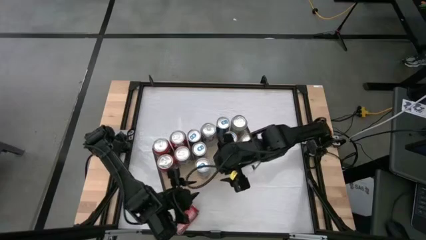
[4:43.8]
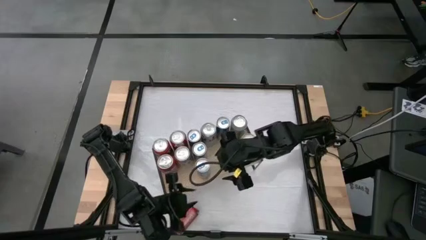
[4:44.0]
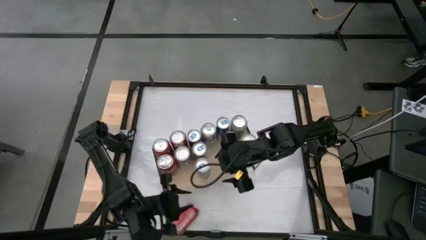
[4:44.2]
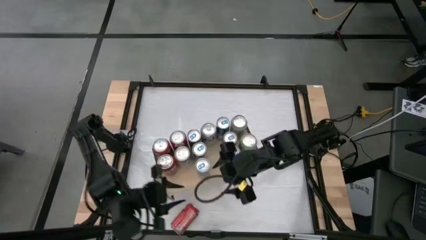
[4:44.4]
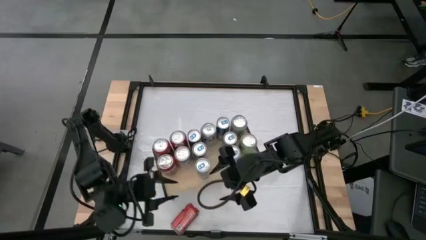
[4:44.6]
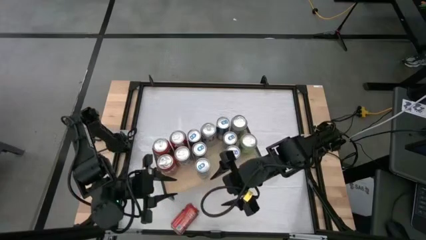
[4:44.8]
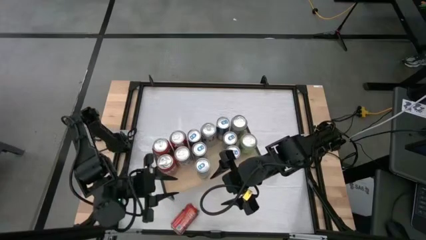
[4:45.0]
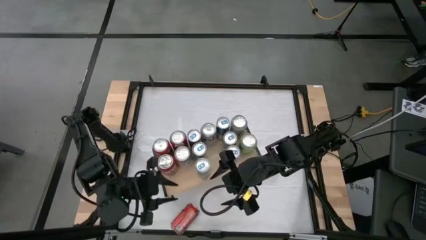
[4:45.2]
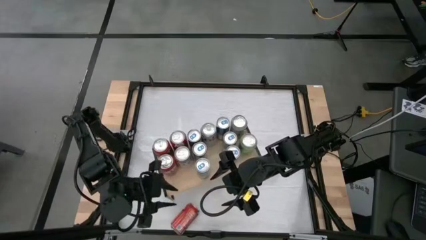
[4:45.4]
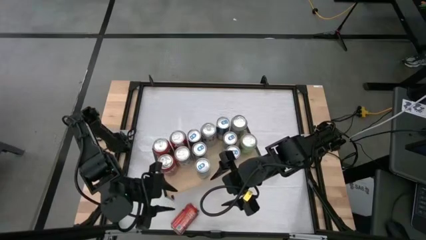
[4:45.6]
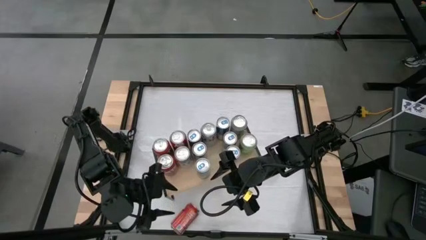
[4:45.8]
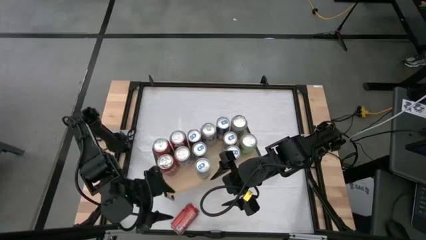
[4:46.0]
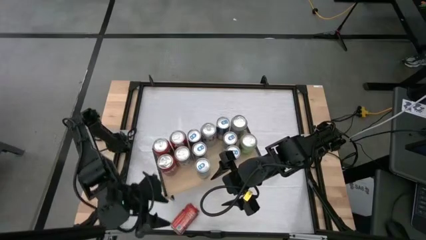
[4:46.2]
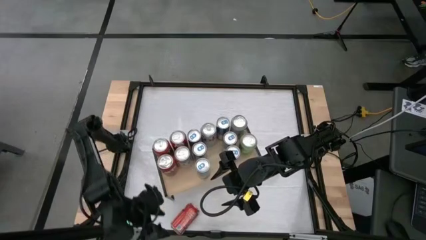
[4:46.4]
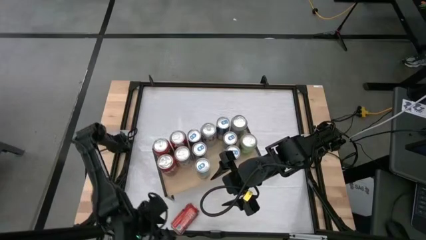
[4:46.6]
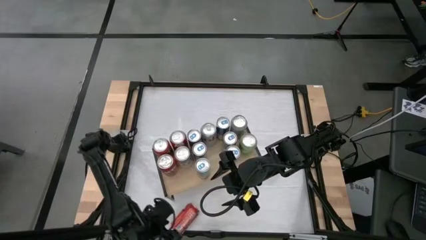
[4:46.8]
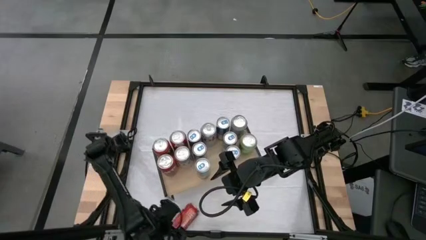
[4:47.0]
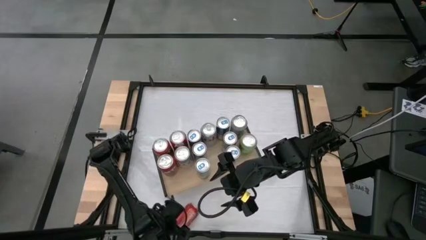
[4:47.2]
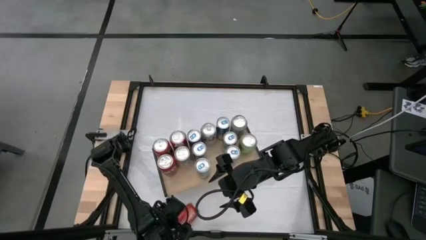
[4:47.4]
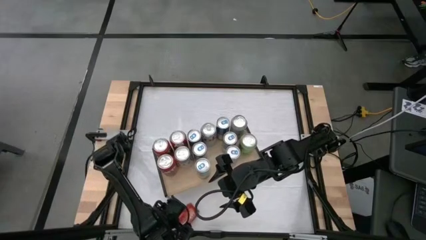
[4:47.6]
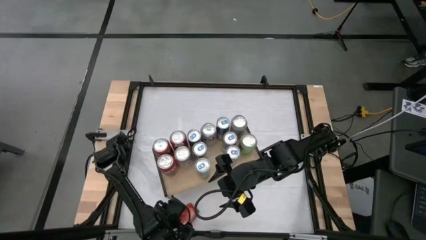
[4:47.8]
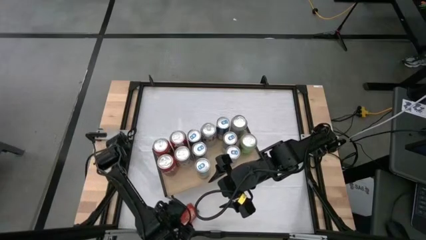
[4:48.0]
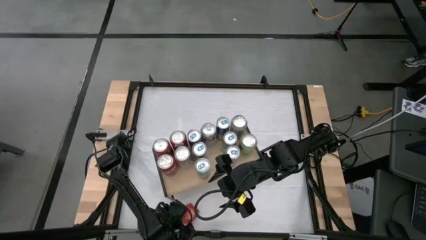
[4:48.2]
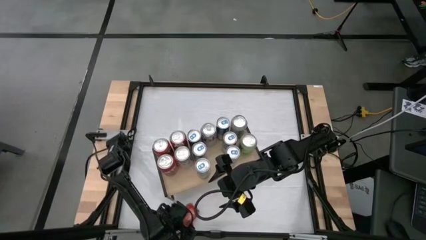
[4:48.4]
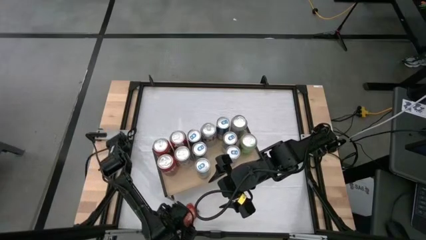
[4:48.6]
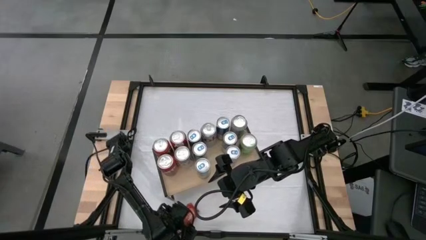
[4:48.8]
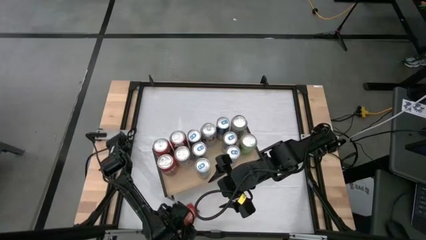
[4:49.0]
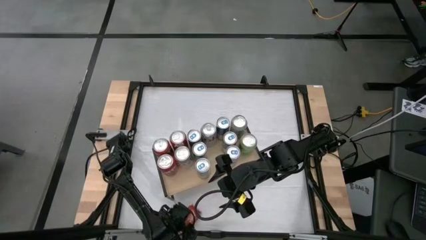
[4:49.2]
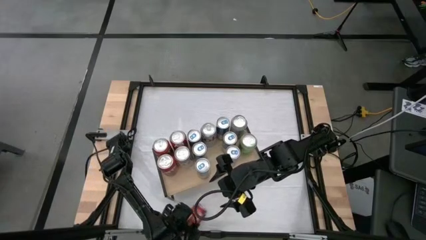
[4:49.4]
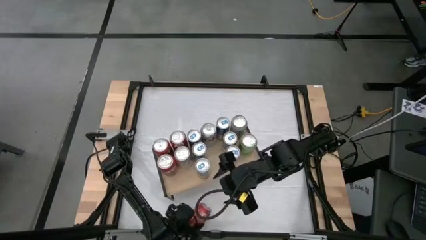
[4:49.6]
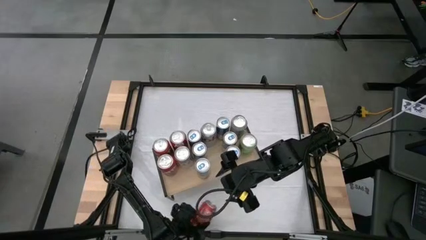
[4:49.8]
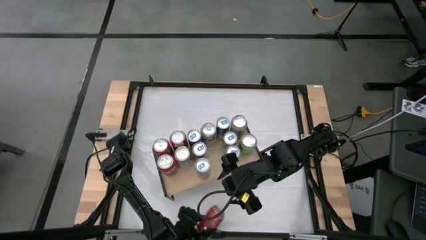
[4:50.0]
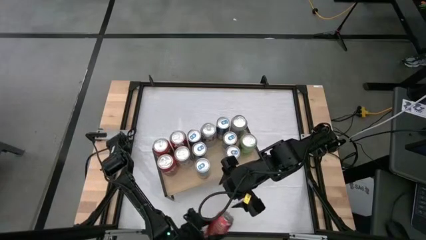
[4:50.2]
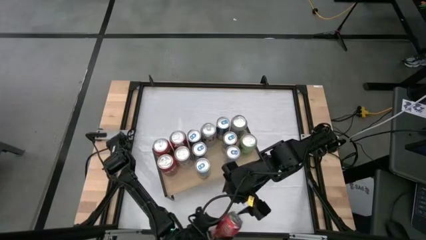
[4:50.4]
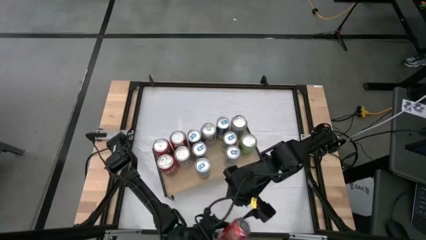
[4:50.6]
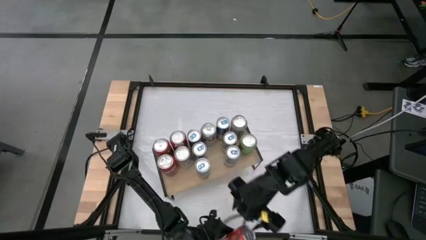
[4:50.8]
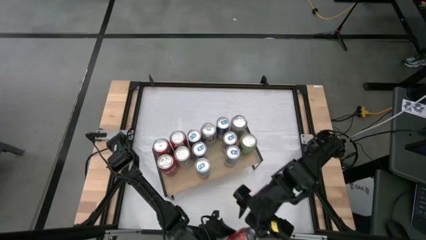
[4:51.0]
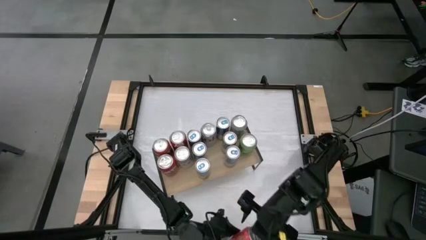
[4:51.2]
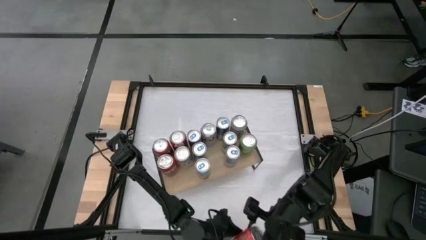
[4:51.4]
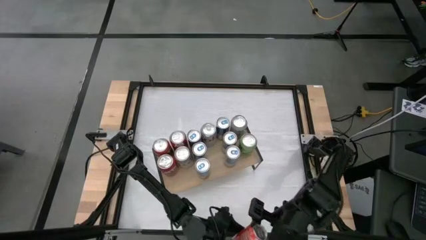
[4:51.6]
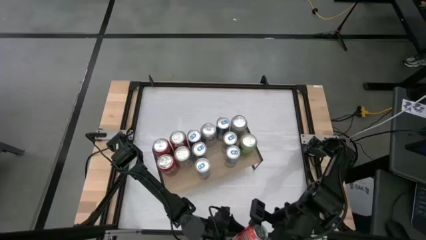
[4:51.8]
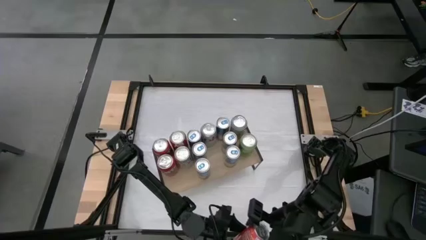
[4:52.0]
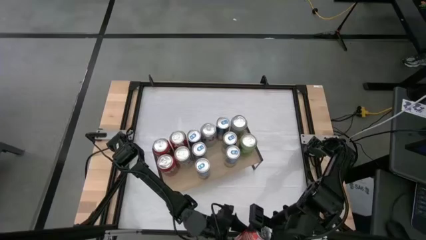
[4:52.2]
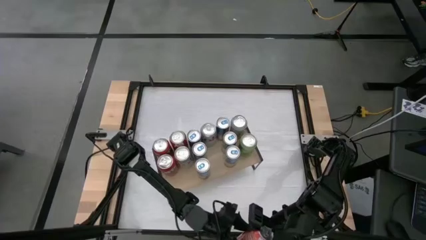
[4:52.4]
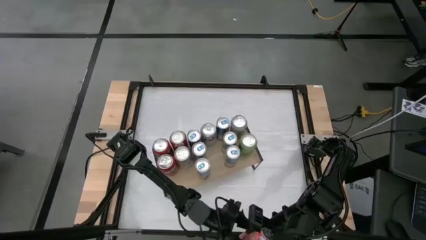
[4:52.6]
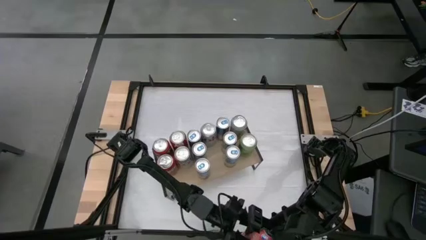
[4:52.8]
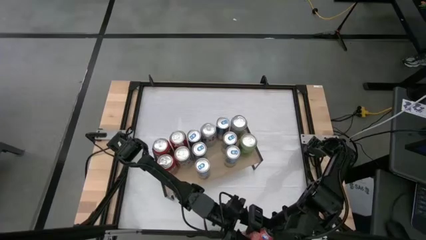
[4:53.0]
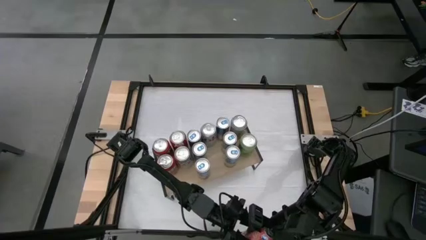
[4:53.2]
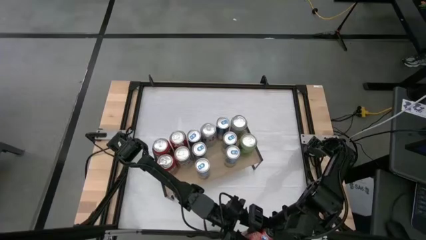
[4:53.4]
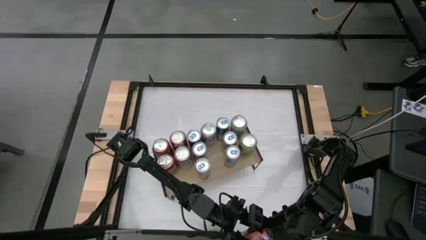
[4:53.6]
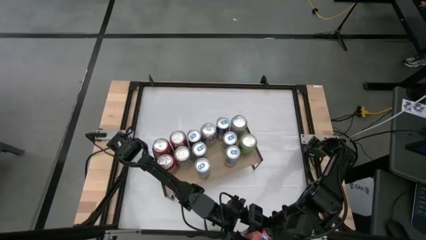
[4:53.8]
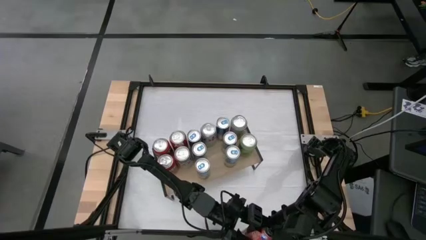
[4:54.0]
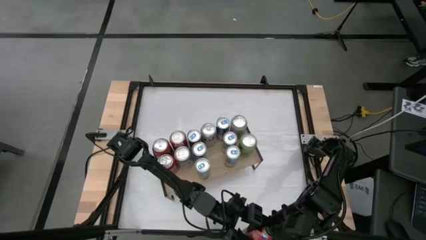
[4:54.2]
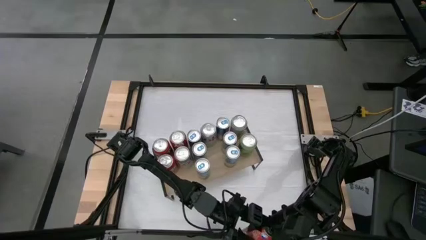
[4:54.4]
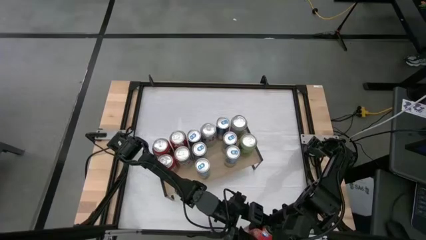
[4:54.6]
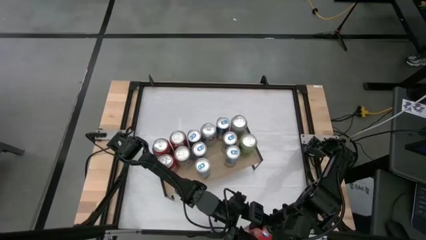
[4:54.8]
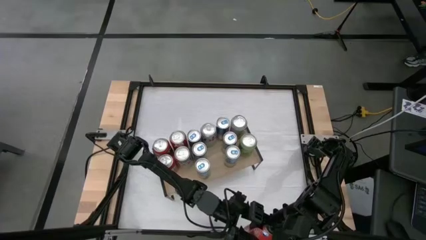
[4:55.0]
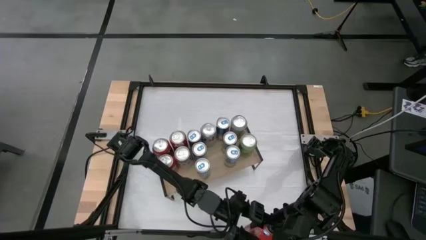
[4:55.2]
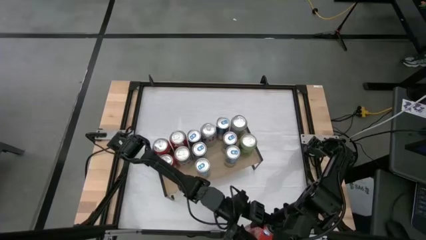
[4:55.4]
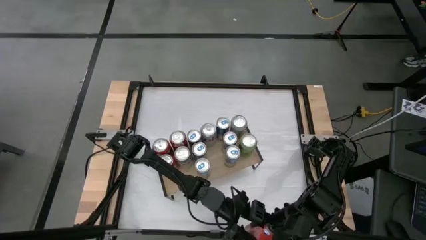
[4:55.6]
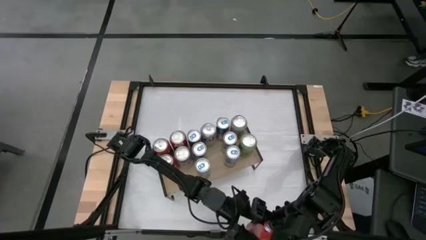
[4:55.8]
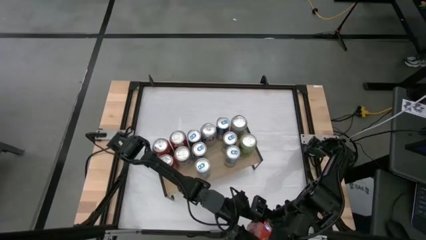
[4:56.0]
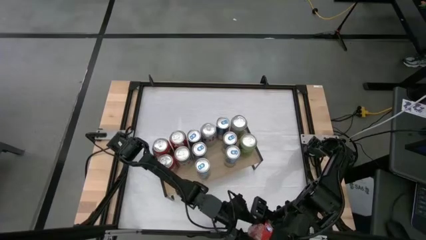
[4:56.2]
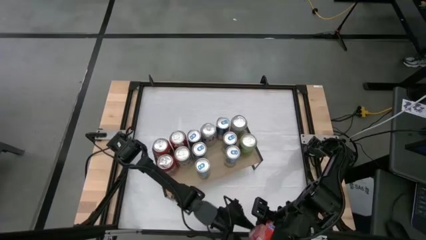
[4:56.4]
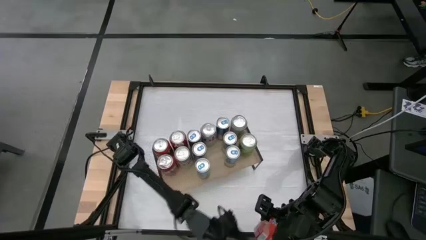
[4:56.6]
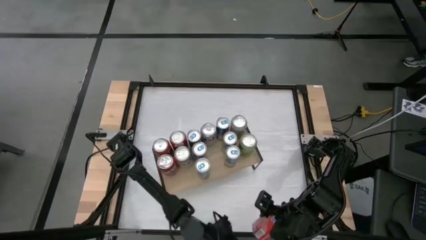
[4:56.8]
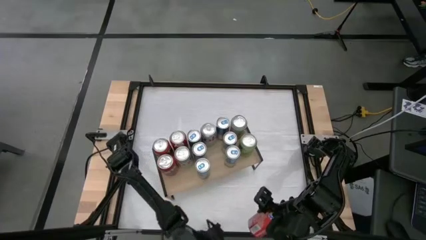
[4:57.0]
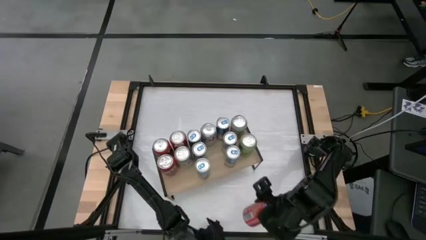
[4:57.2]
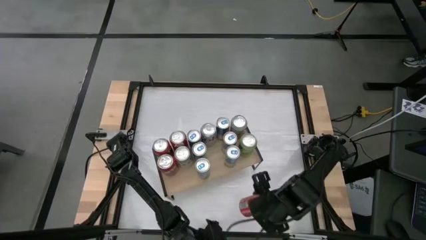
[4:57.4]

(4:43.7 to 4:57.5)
Task: Place canned beverage on shelf
Put the red soda can on the shelf

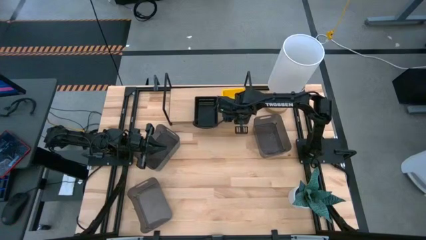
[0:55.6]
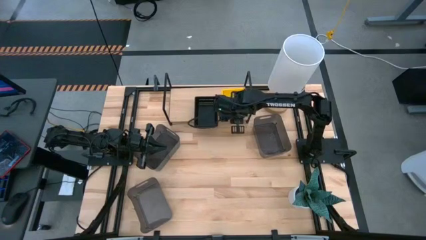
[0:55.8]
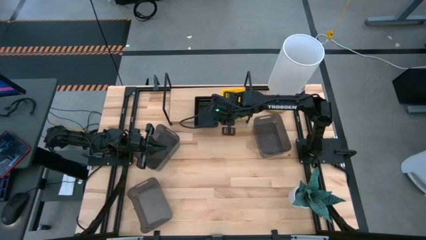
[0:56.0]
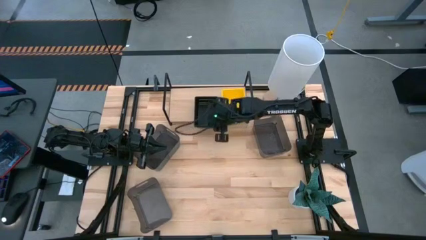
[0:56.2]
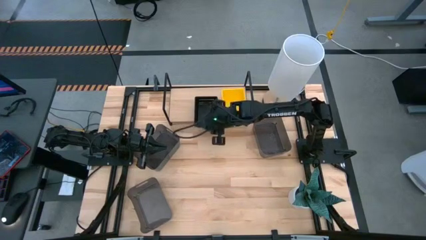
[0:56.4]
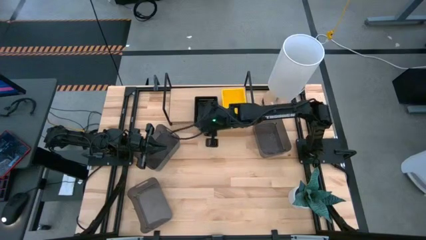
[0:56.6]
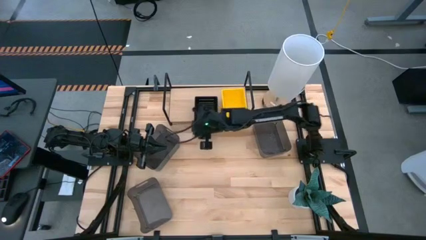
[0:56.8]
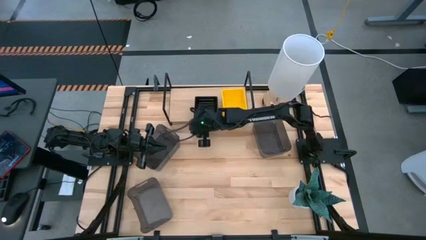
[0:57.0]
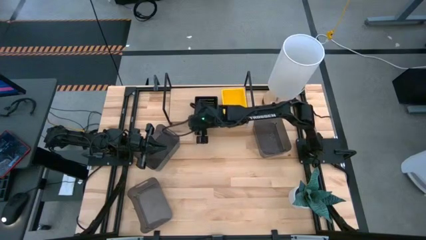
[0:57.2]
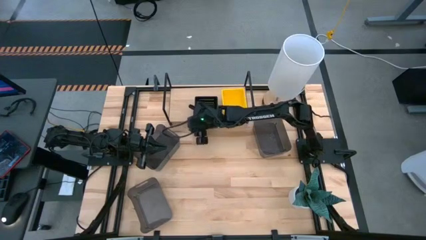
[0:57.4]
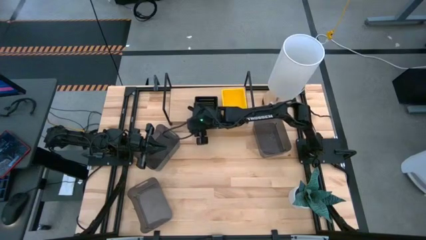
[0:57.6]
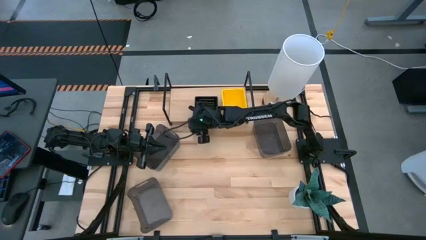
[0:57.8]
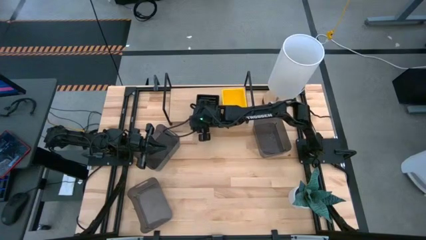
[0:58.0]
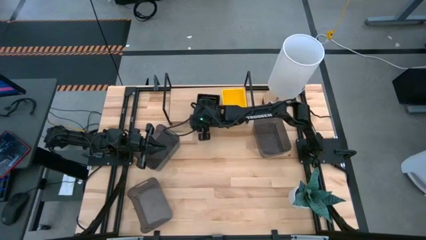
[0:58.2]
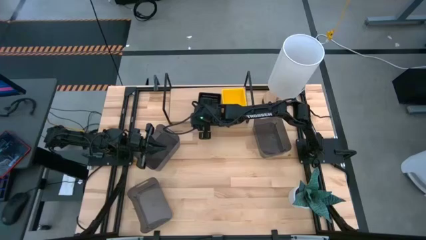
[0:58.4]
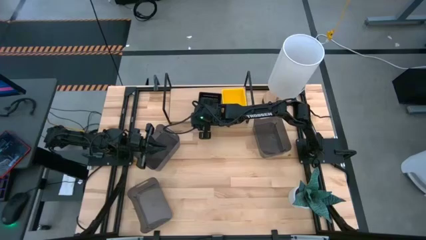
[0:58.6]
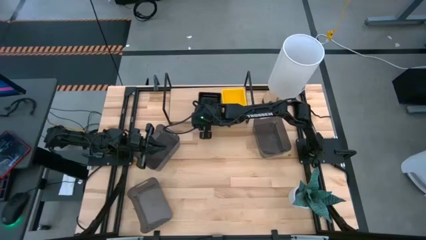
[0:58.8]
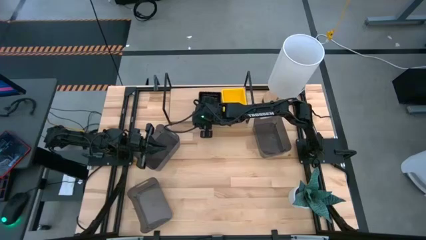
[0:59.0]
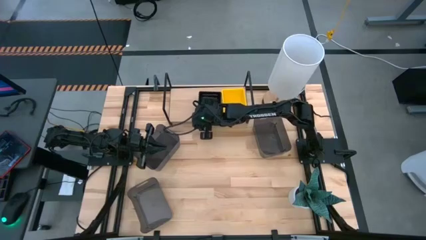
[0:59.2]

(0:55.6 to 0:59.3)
Task: Stack baskets on shelf by color
Adjust the stacked black bins
